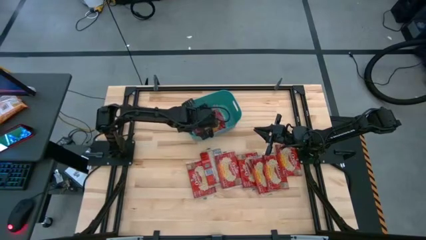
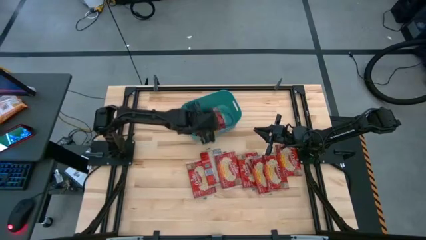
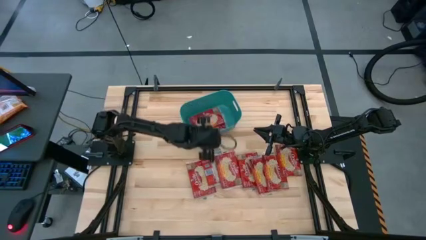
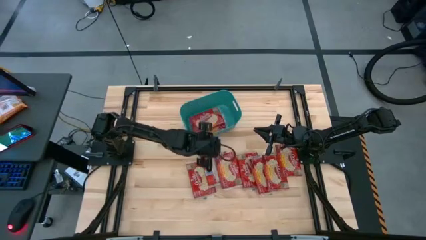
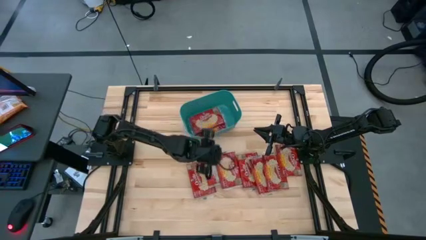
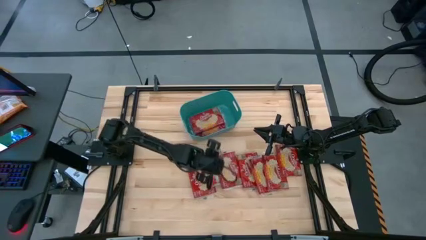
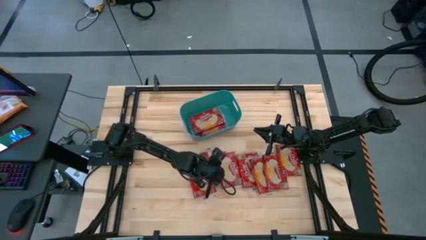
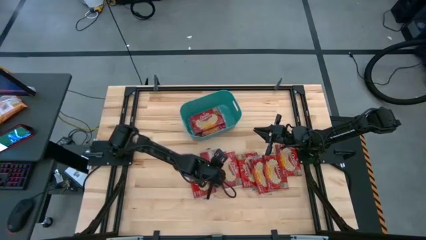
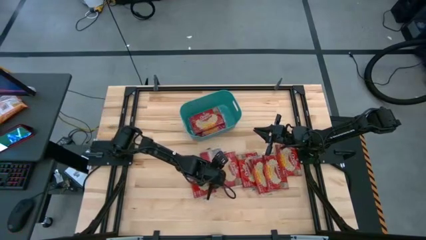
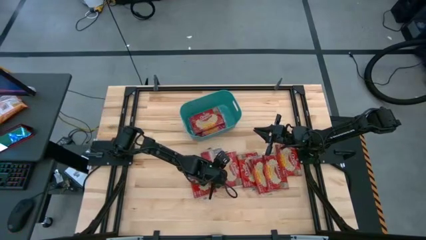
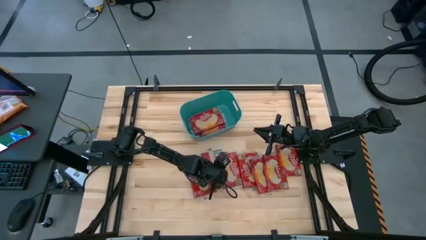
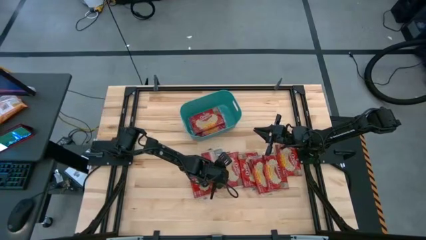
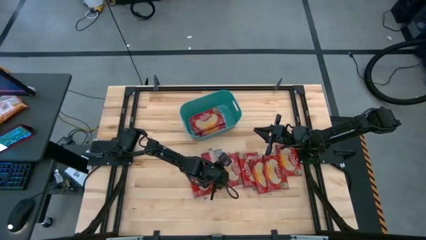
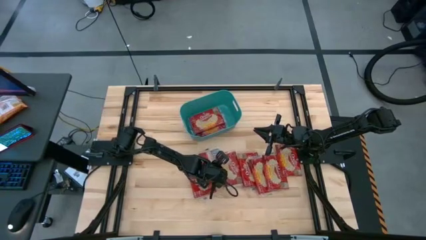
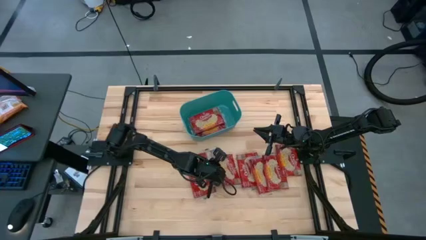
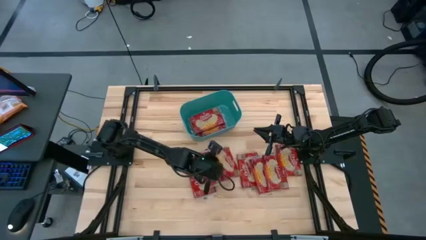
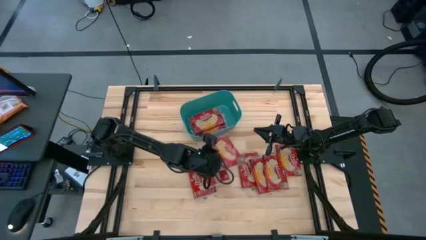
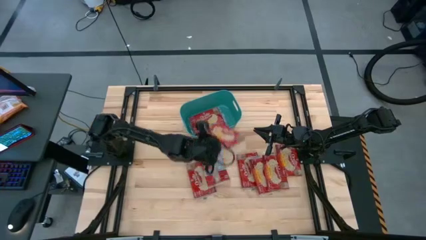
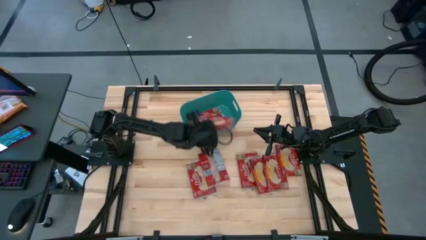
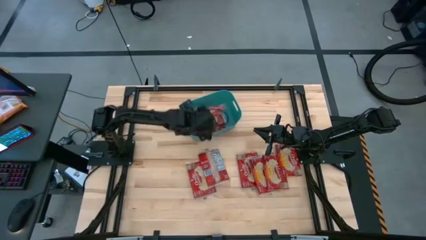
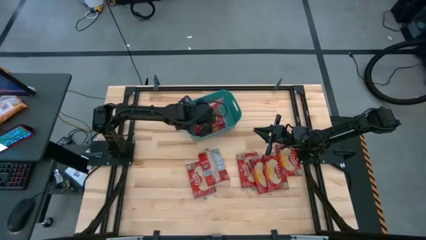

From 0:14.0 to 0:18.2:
Task: Sort popcorn bags into baskets
Put the red popcorn bag into the green bin

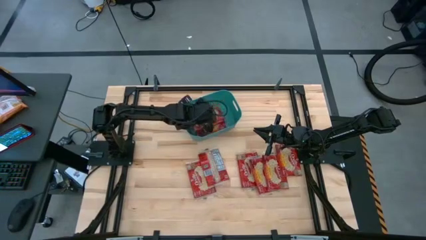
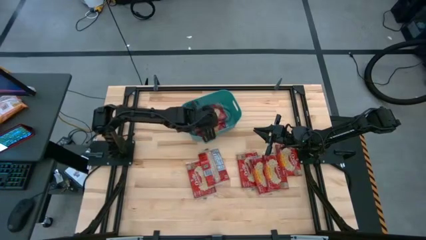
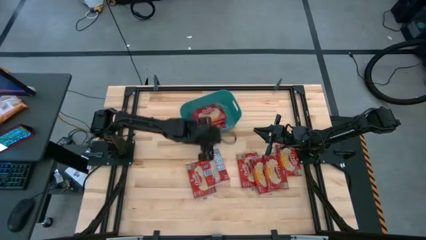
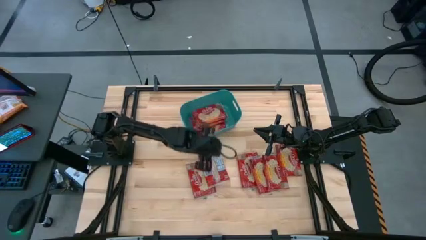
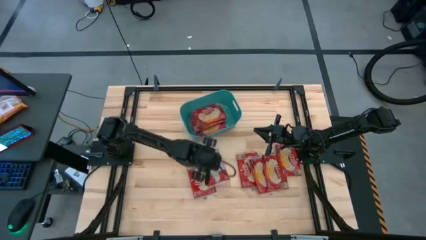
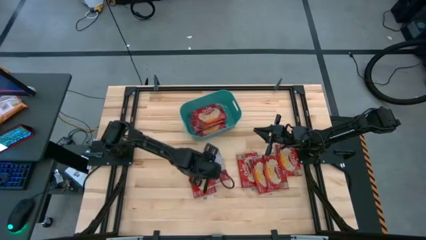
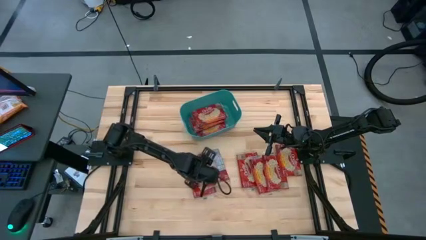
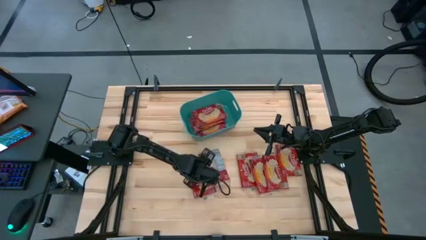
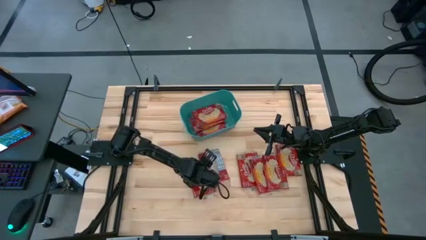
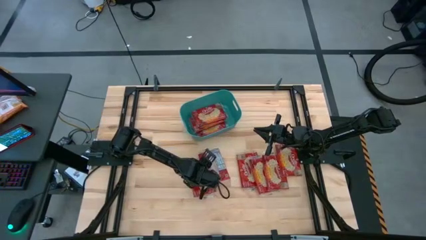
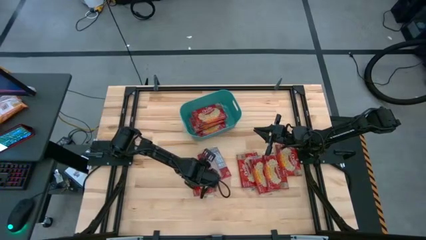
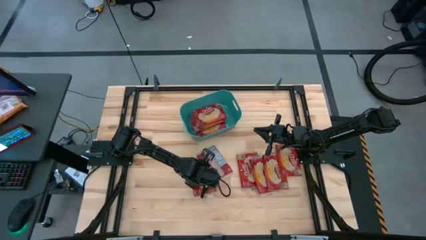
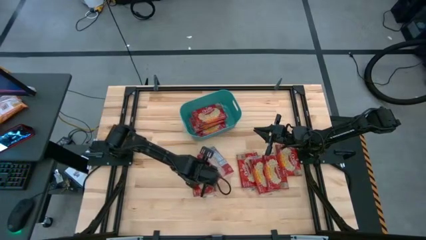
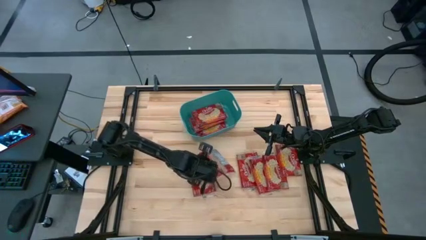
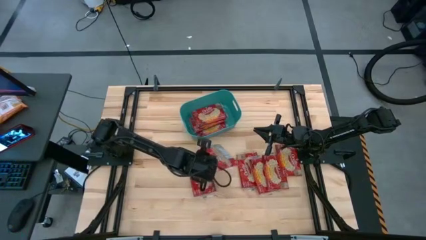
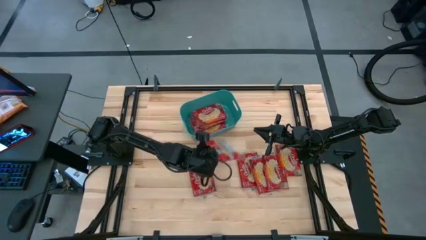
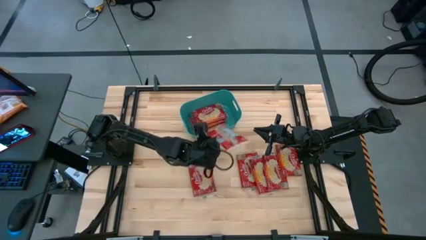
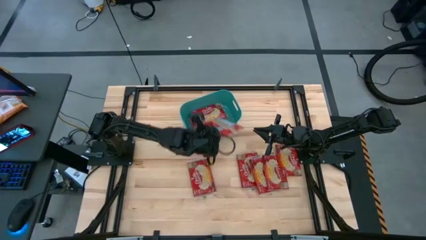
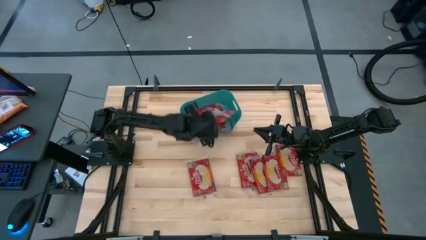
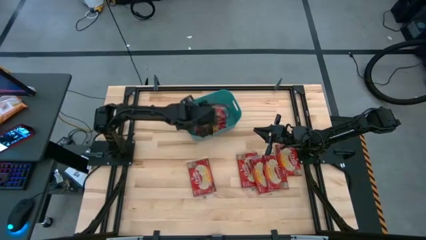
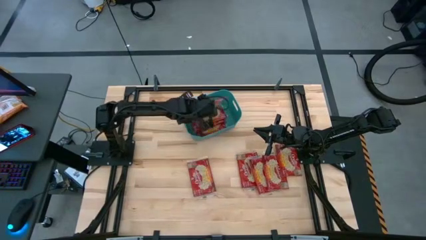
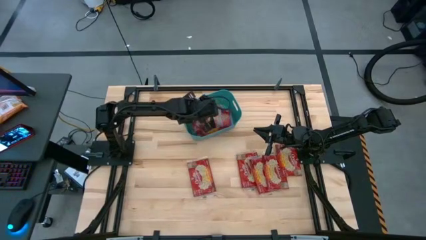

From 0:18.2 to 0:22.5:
Put the red popcorn bag into the green bin

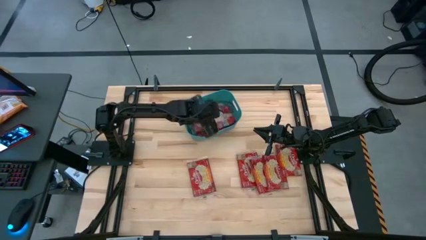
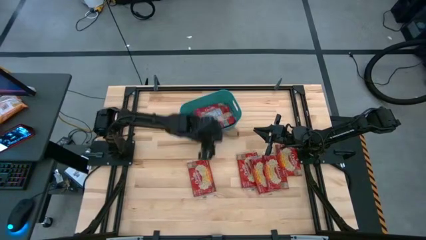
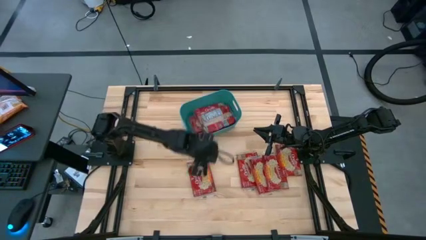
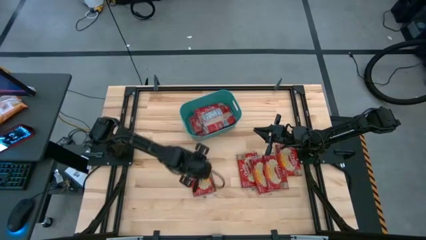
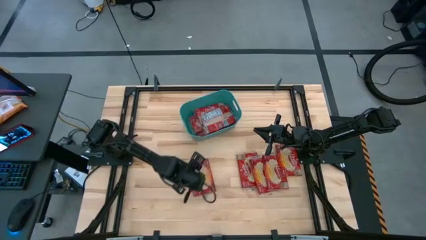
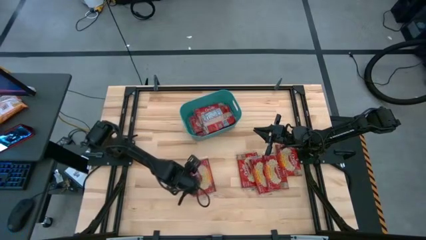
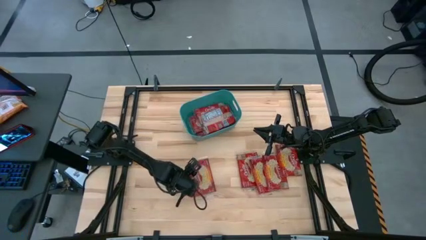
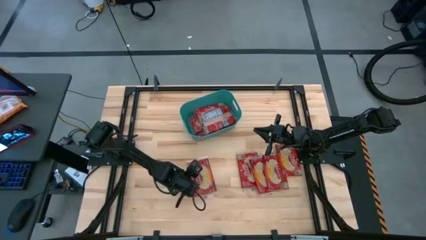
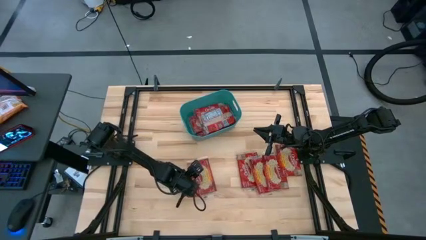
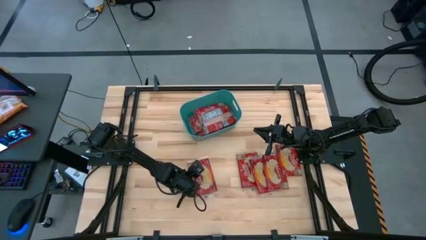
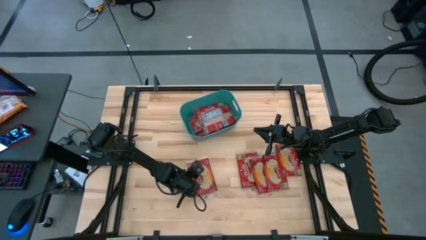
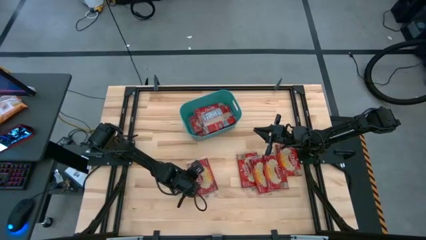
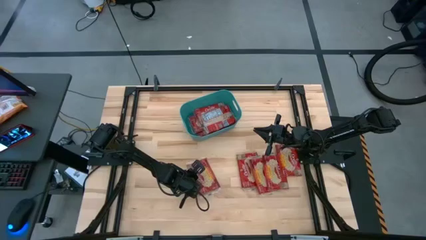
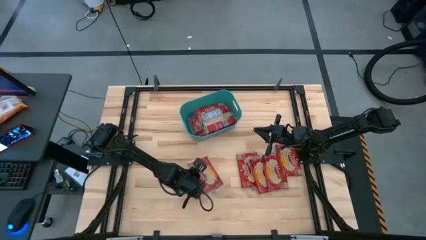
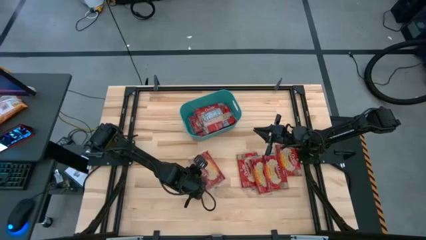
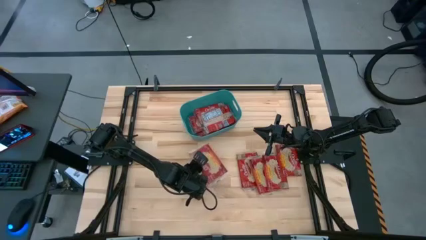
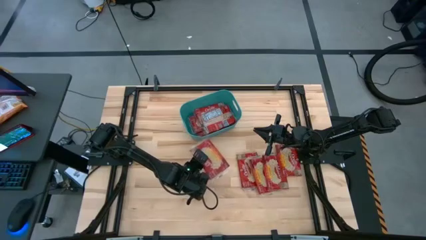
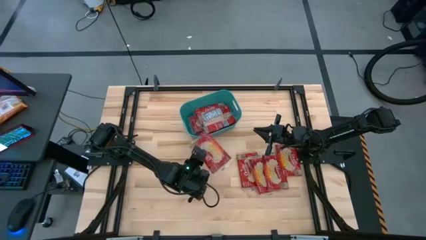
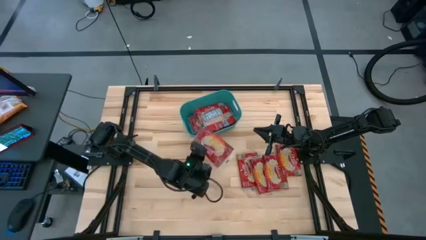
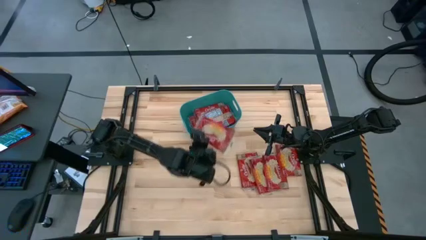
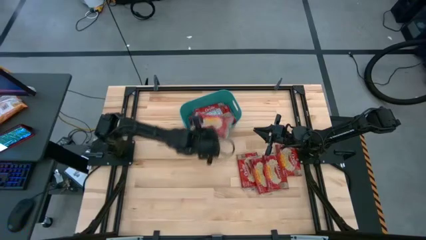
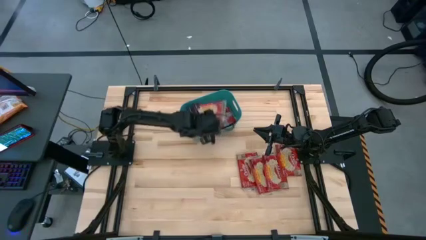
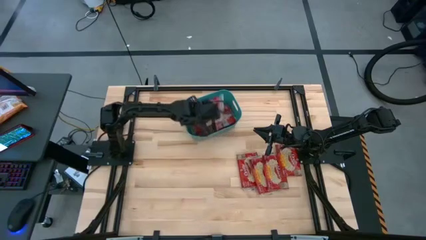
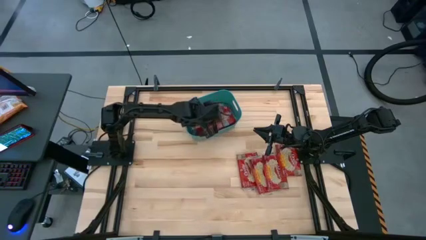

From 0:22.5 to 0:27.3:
Put the red popcorn bag into the green bin

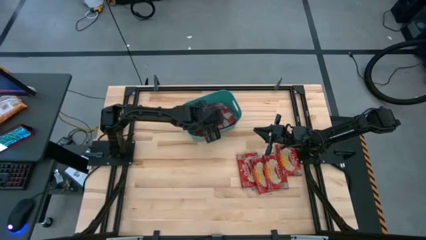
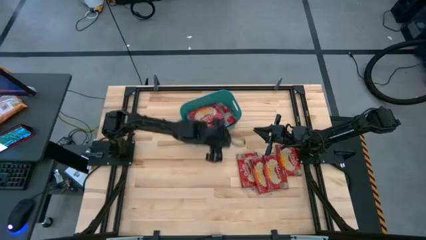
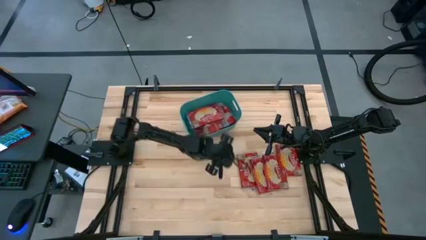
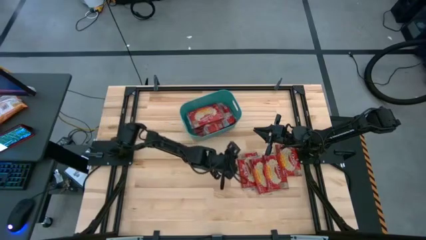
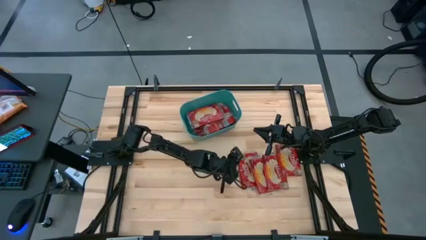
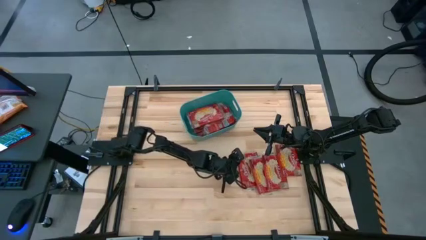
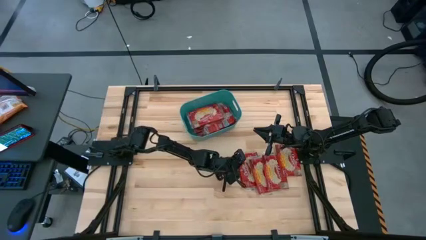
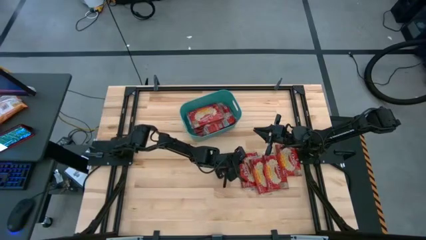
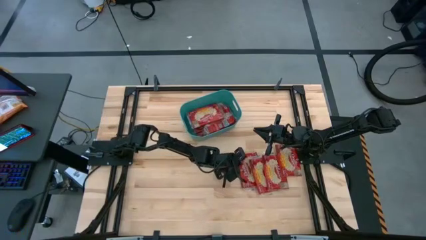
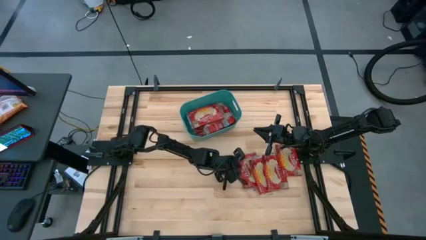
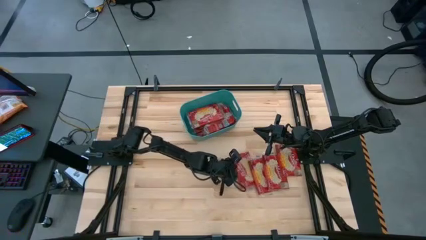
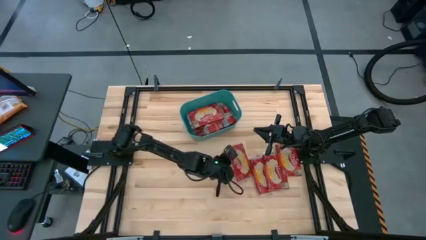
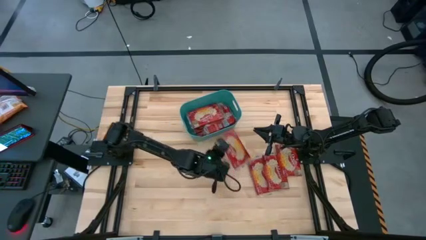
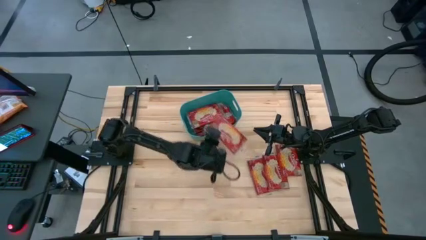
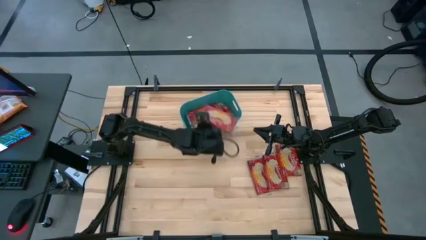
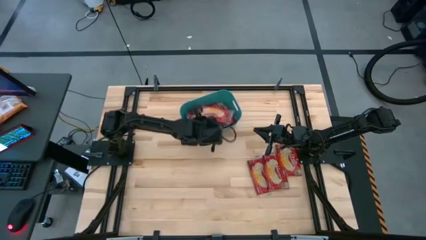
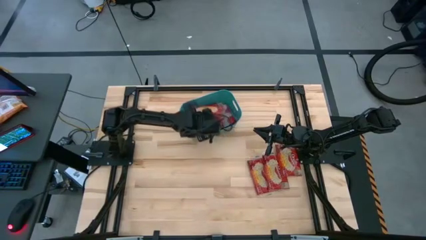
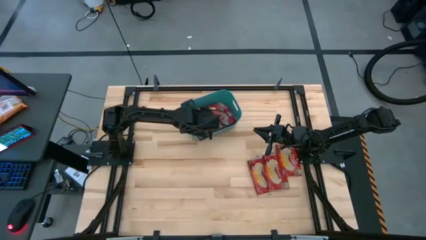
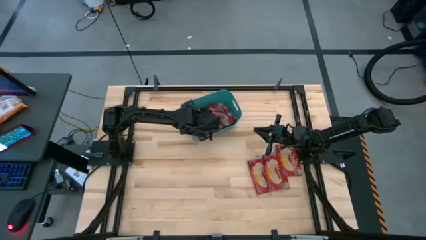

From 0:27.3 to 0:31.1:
Put the red popcorn bag into the green bin
